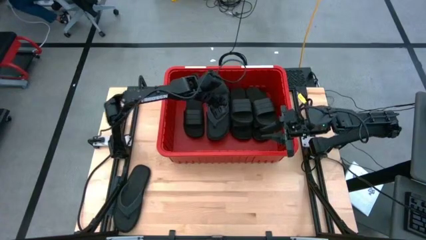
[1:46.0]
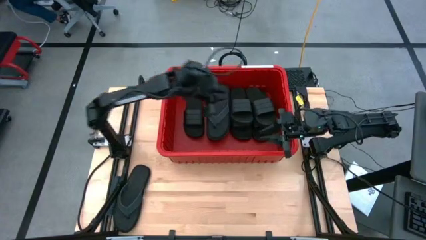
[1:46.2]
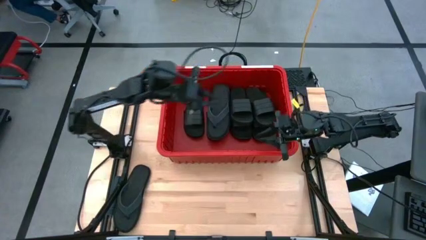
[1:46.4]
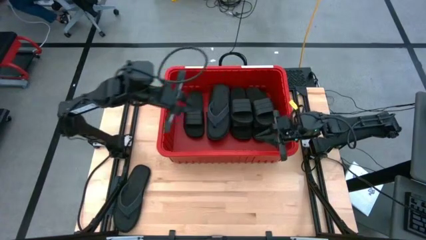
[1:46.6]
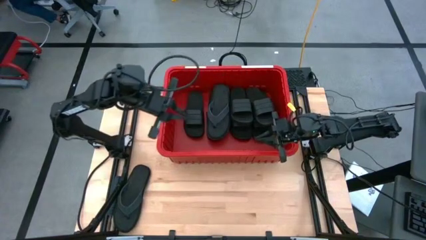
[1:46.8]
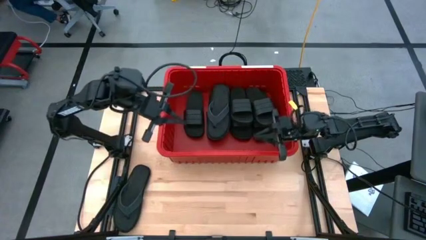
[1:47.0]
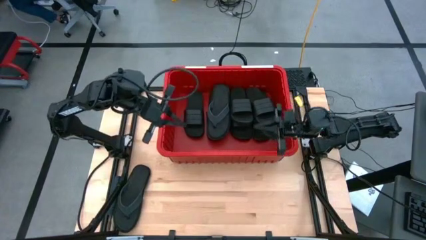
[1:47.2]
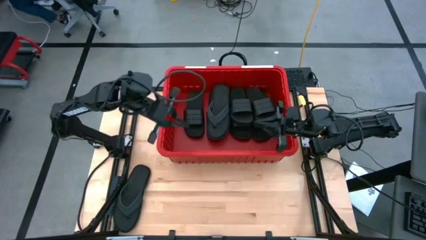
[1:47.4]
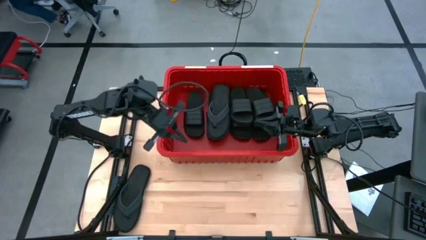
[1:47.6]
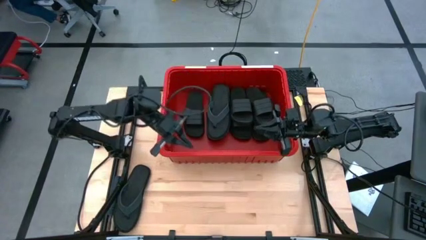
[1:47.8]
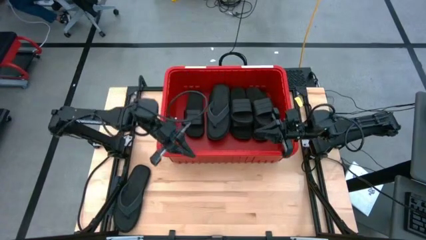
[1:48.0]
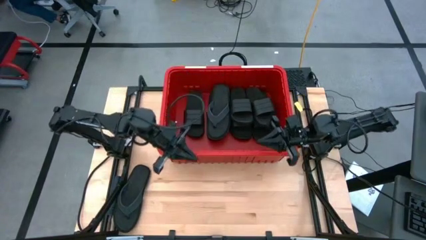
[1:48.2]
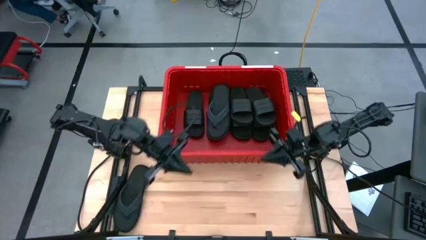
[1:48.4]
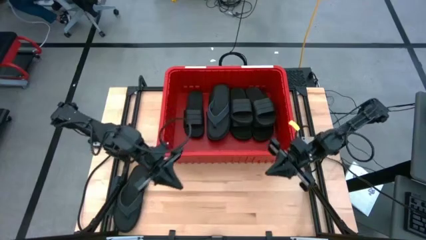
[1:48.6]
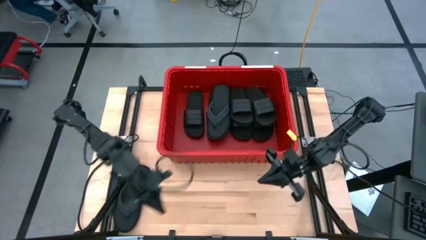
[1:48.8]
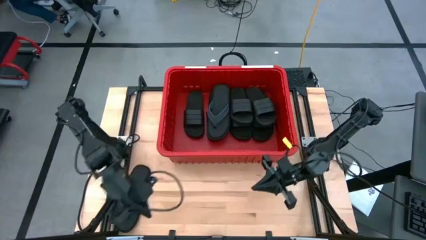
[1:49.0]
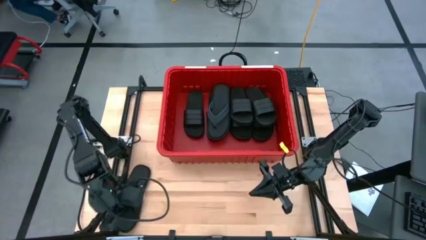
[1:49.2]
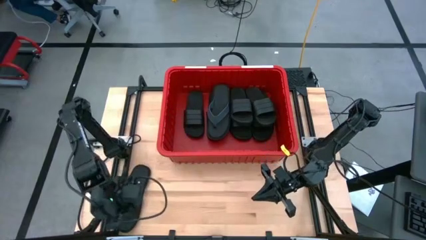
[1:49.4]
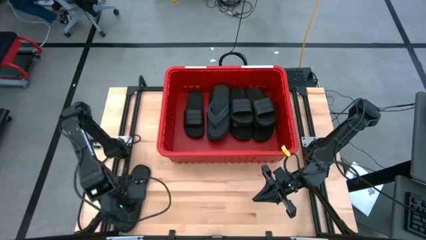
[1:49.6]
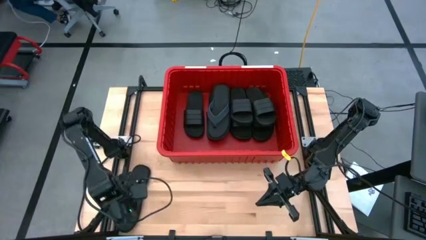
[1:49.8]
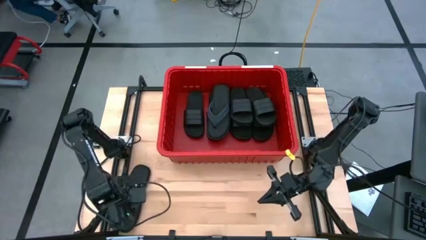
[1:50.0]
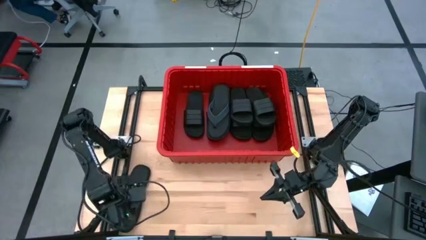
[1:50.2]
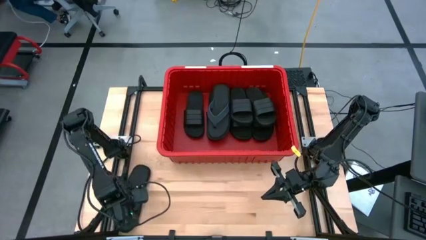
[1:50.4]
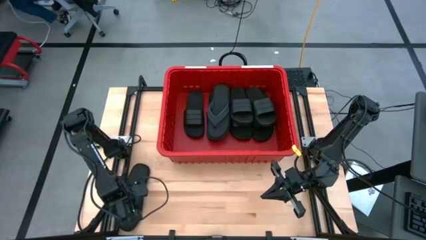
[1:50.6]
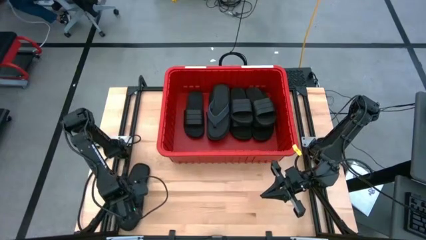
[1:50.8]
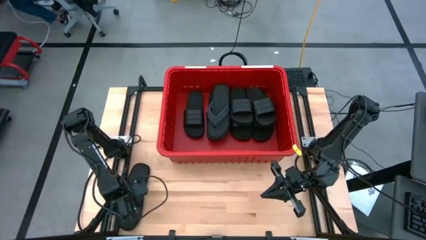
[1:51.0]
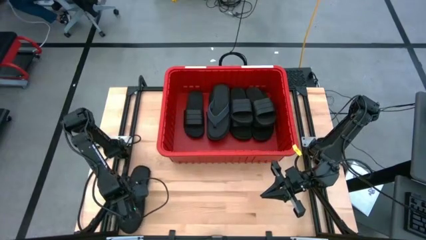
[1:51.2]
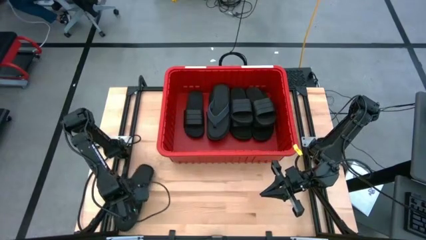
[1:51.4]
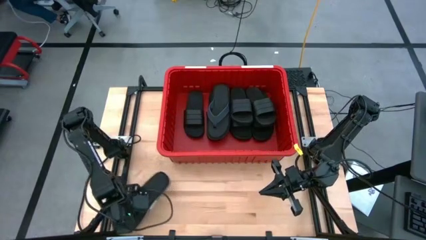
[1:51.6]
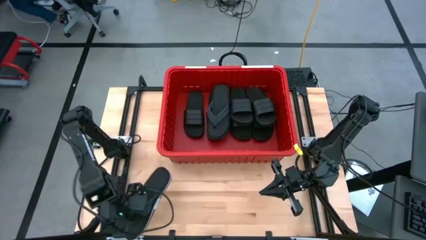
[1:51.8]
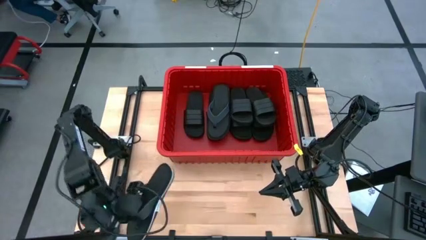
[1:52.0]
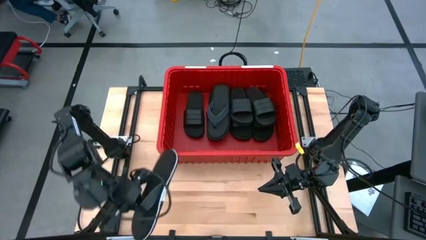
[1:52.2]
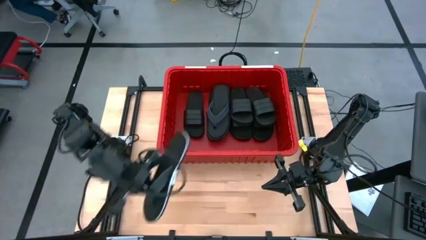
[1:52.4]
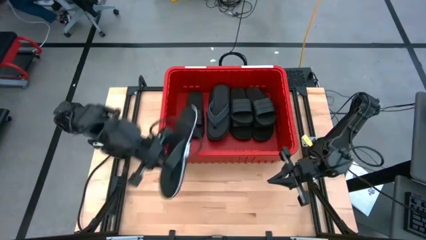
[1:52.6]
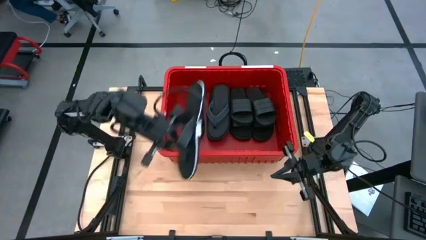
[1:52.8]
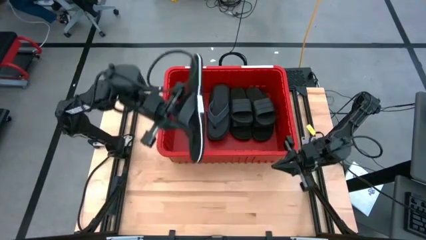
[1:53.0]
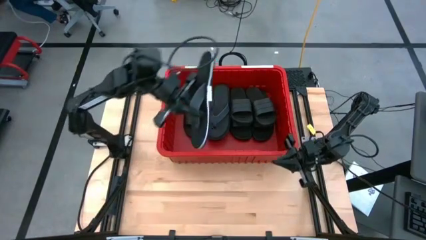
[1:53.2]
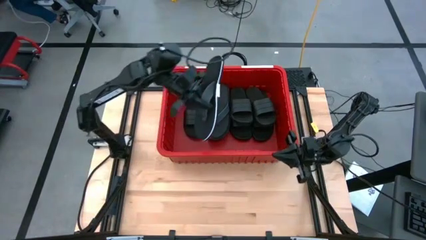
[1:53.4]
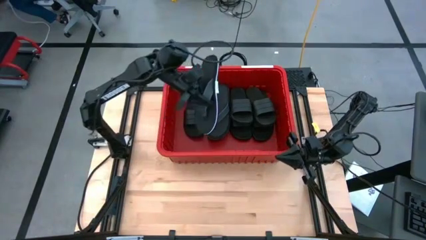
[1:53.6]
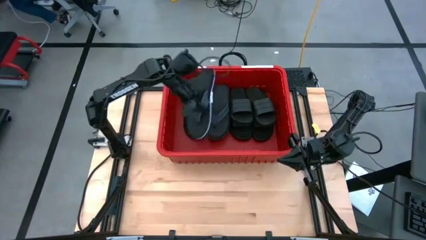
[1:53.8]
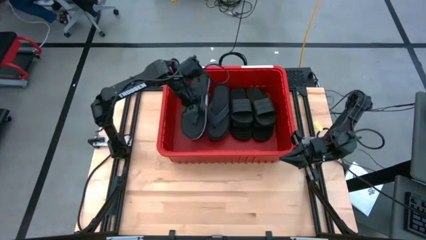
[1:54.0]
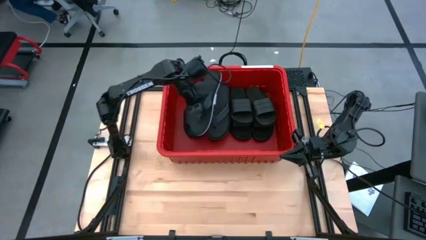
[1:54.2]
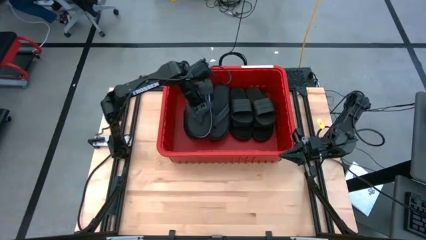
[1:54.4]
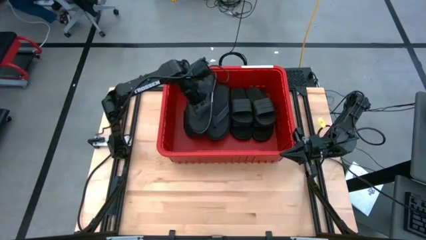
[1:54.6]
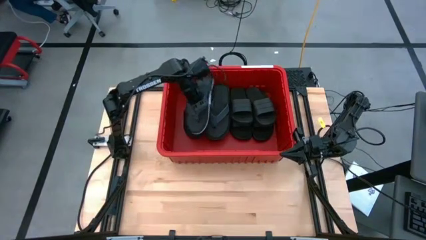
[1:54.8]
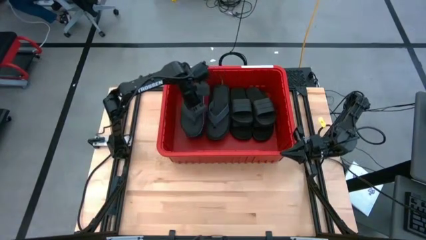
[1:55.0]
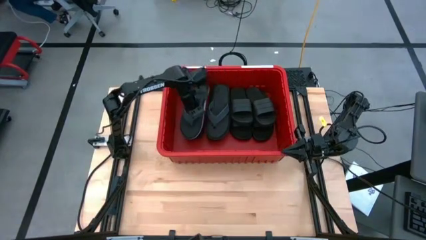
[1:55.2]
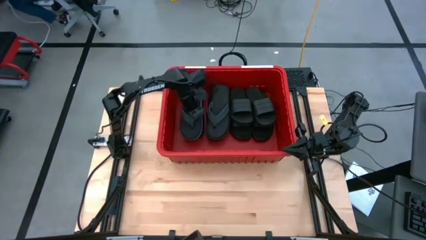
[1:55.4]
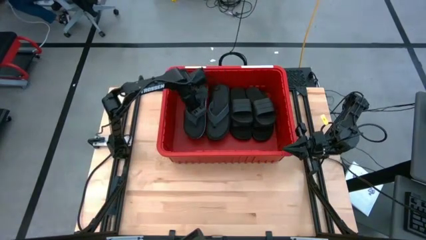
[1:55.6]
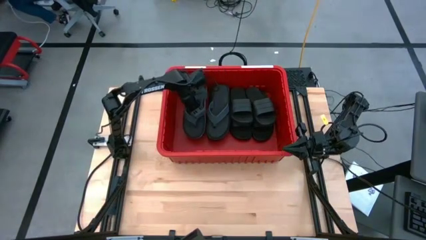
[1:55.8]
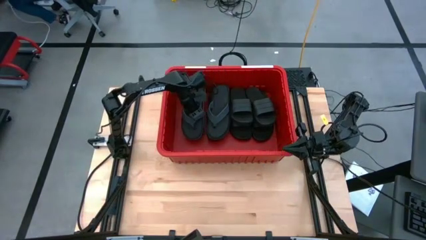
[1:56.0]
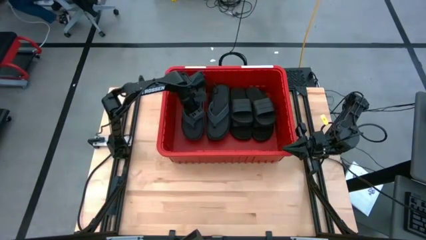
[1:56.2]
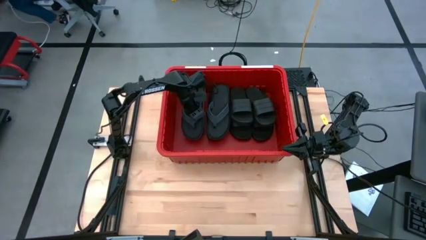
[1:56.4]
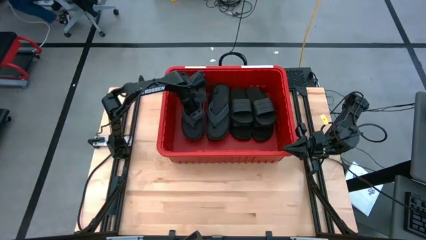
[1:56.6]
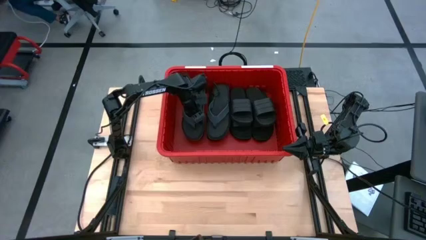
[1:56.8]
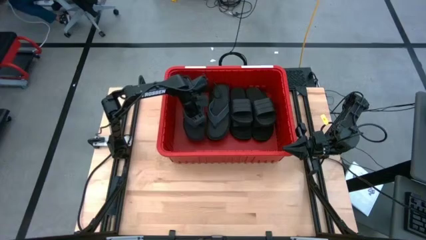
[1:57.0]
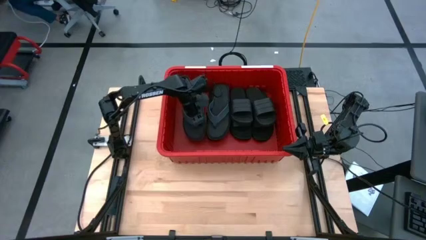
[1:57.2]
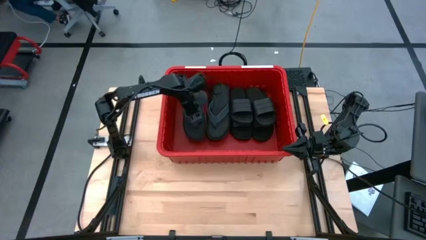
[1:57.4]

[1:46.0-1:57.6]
Task: Pick and place slides into bin
Stack the black slipper in the red bin
